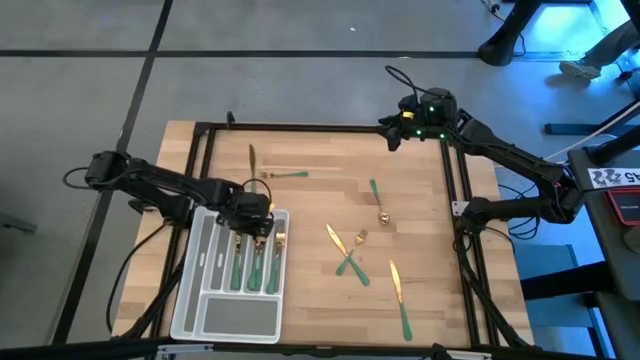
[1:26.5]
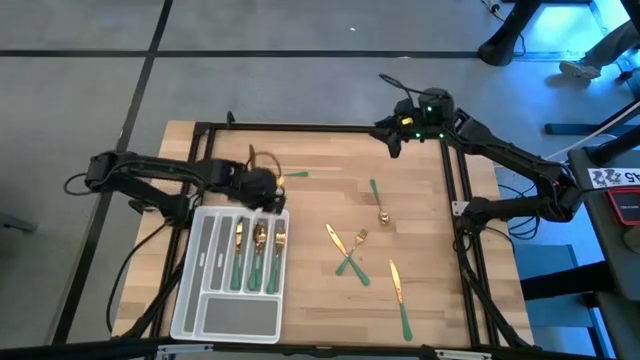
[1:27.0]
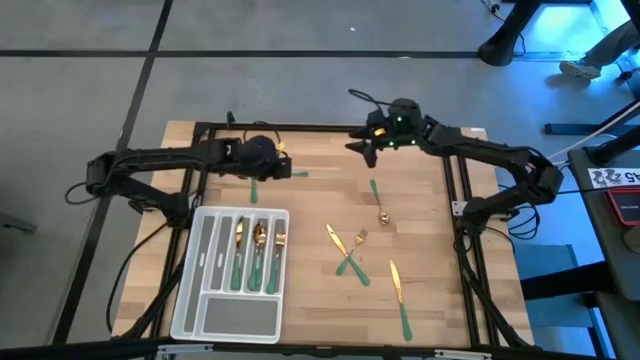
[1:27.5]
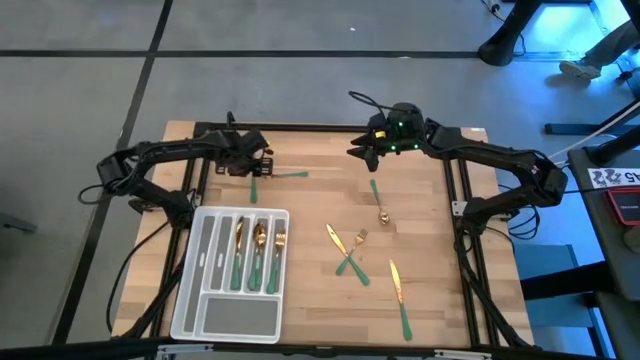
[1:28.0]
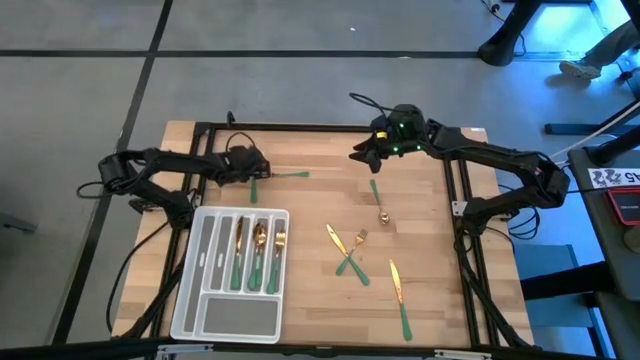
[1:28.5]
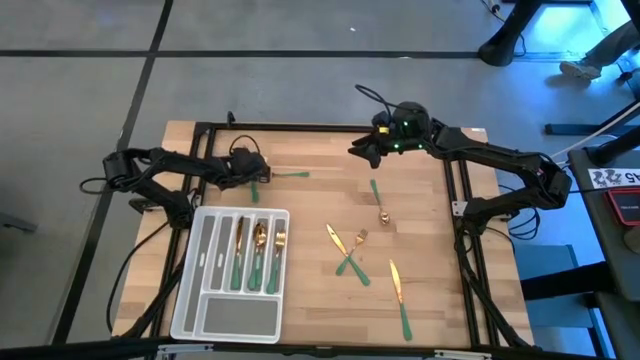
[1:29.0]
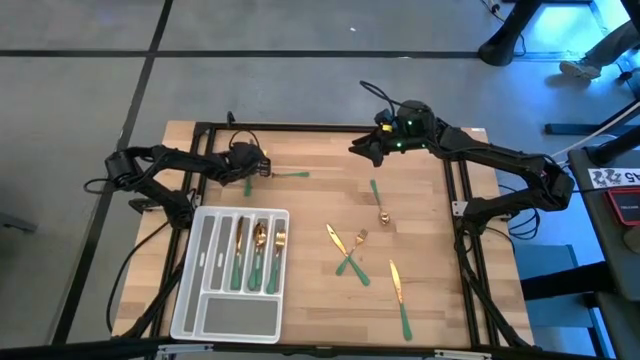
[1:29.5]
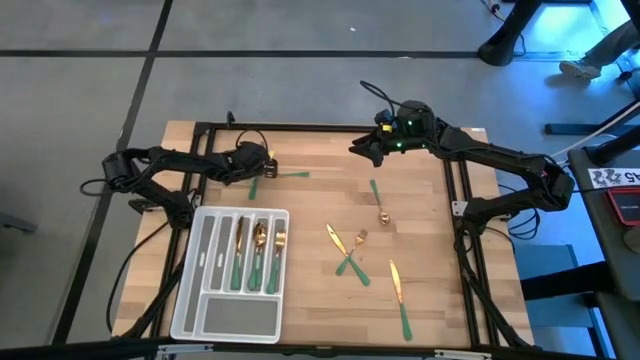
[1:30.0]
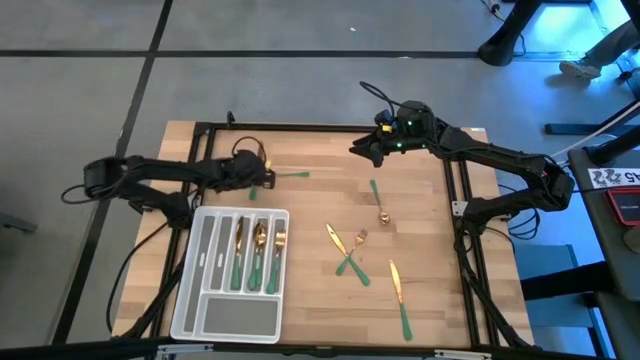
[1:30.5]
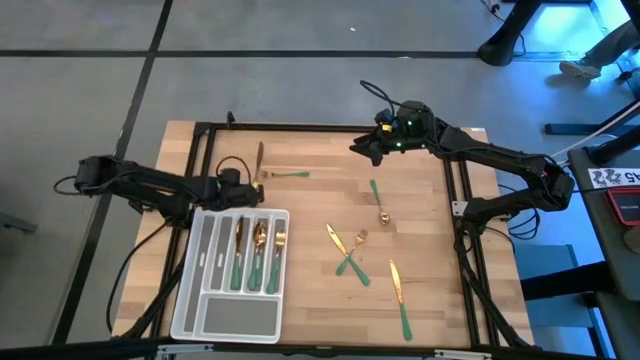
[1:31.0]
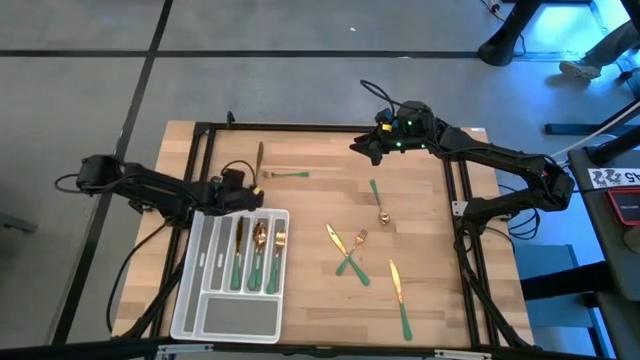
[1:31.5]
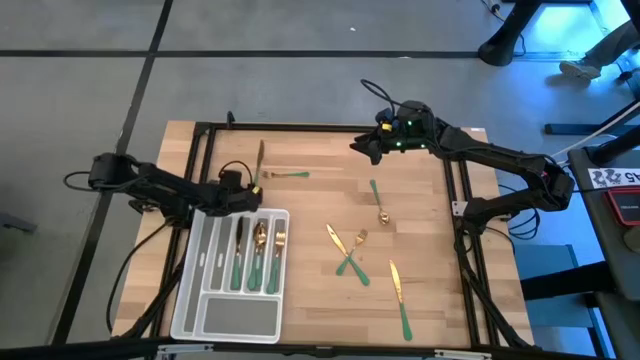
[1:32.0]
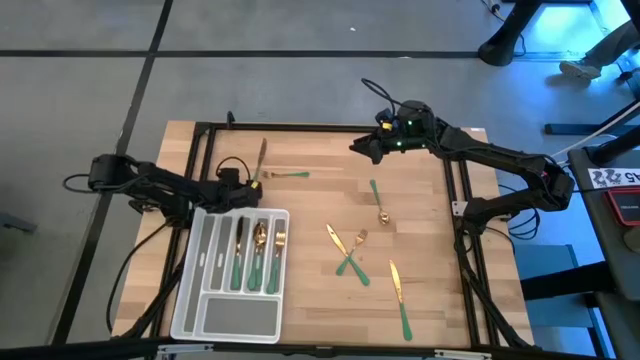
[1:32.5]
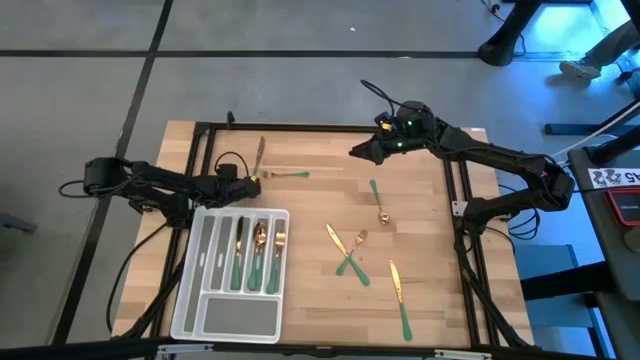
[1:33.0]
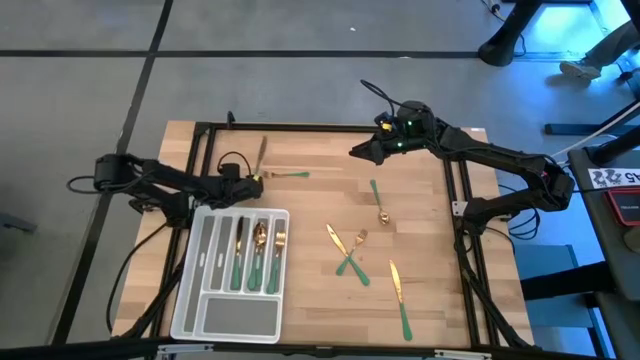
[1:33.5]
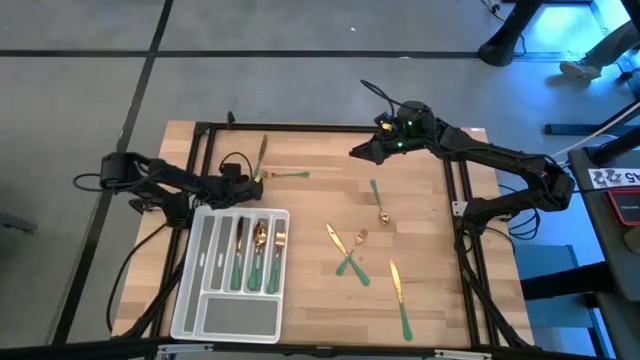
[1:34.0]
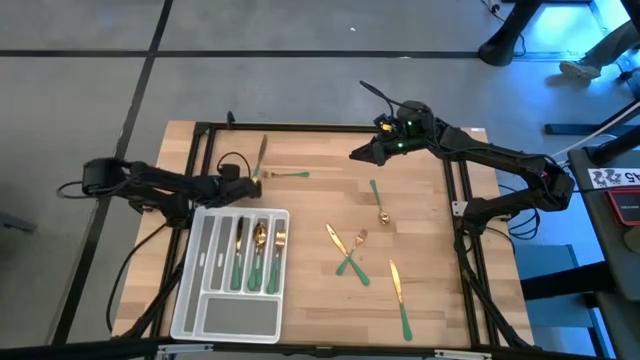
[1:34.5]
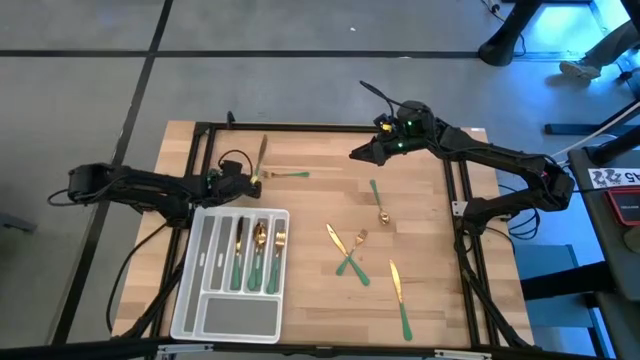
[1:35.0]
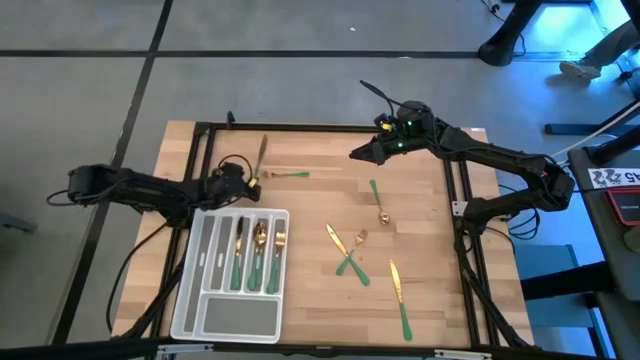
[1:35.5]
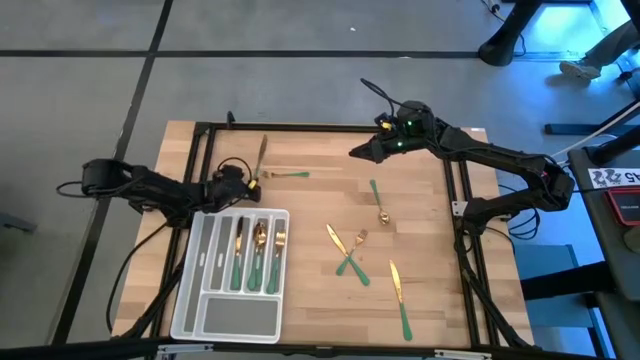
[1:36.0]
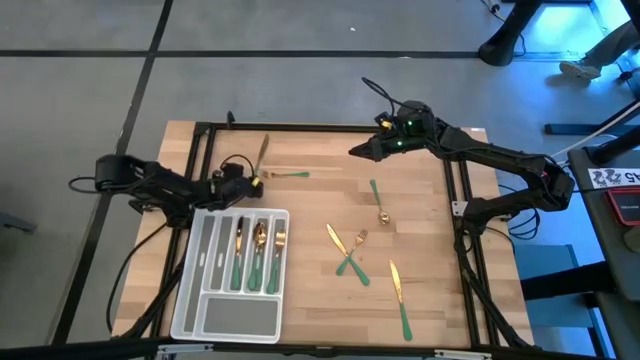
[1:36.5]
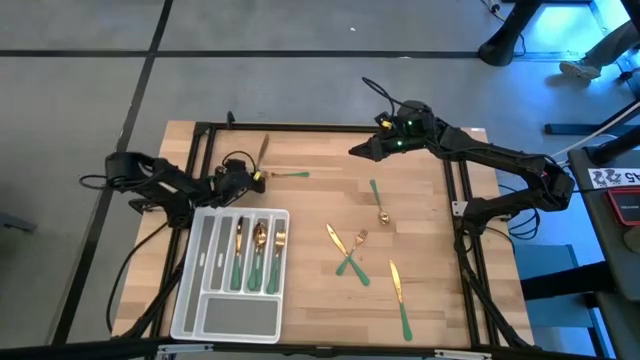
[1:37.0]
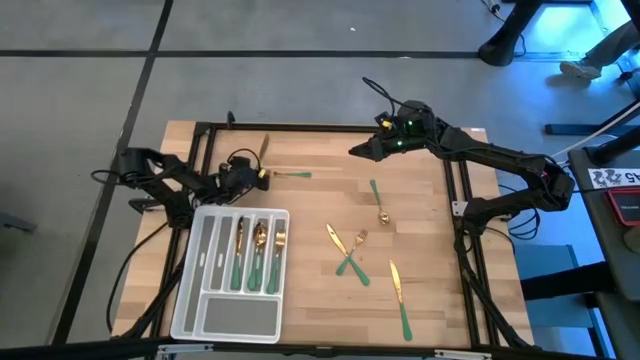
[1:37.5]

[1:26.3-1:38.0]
Task: Sort silverware
Put the knife into the silverware tray

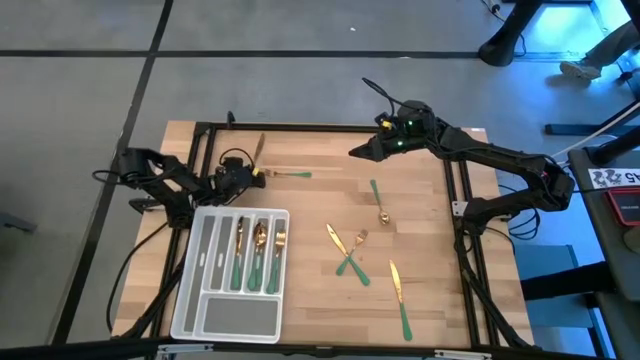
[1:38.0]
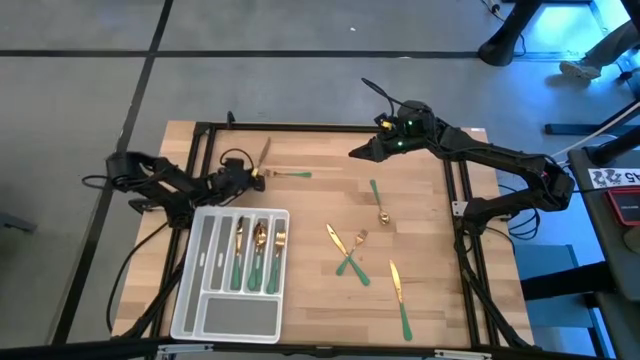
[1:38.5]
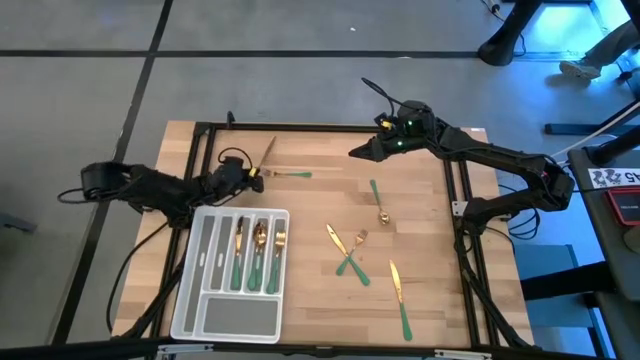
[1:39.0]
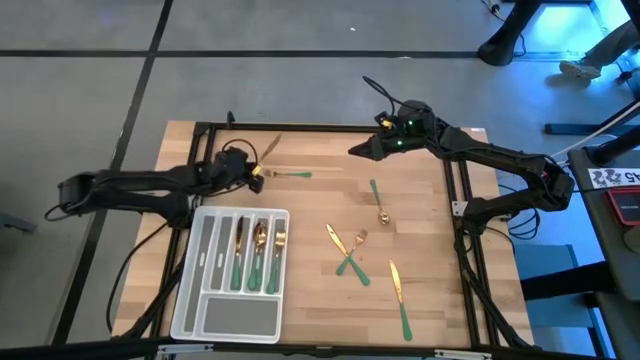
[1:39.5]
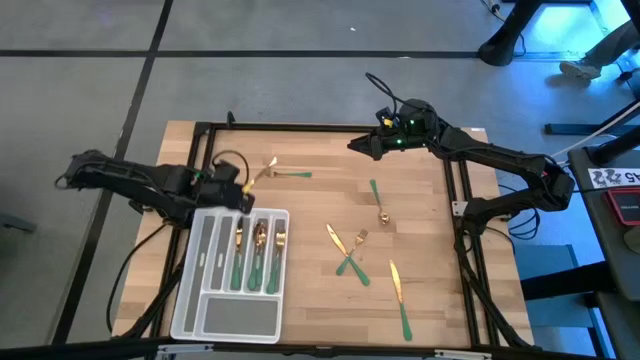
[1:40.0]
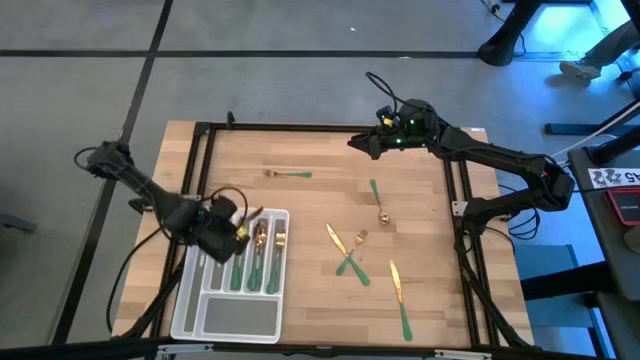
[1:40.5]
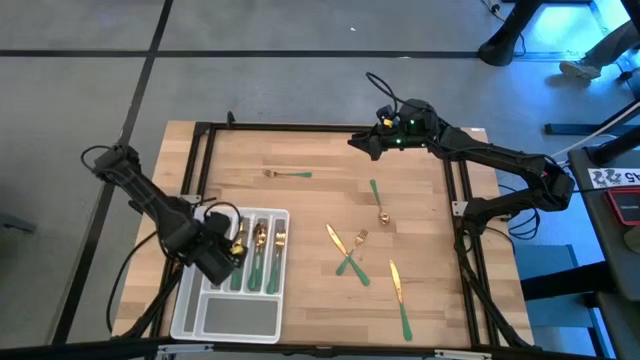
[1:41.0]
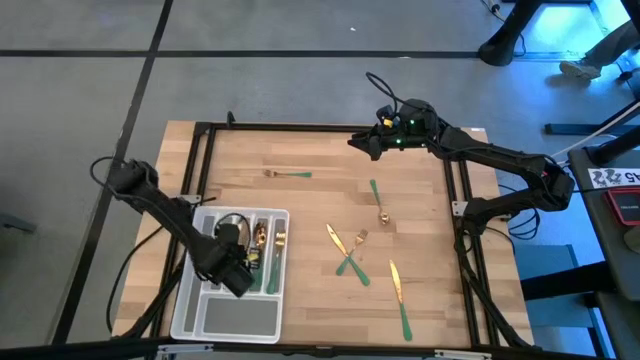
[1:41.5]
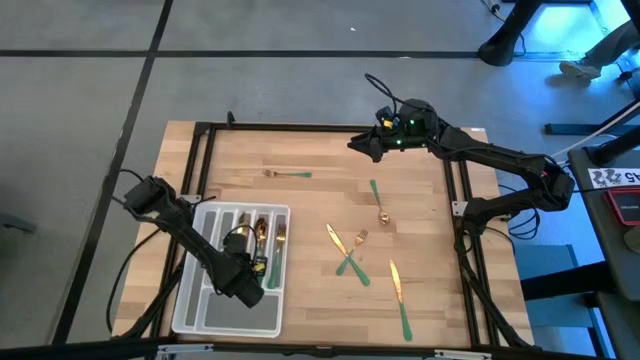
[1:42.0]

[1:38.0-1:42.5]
Put the knife into the silverware tray

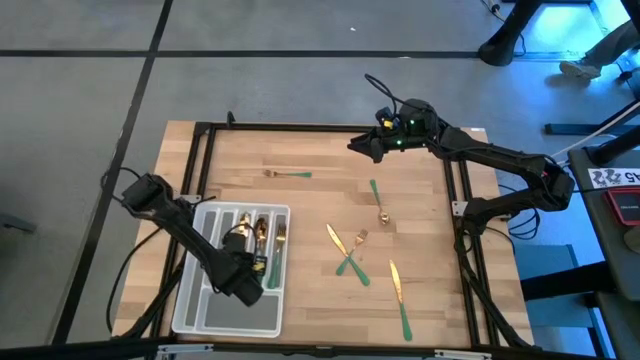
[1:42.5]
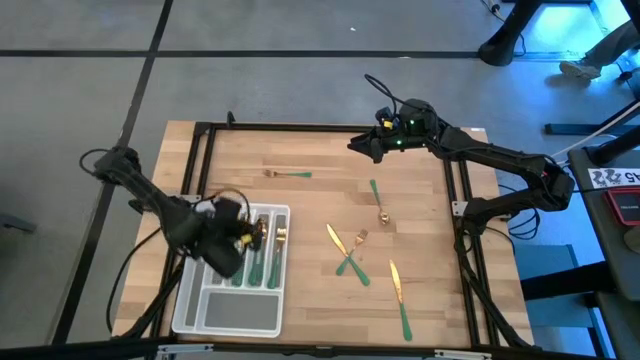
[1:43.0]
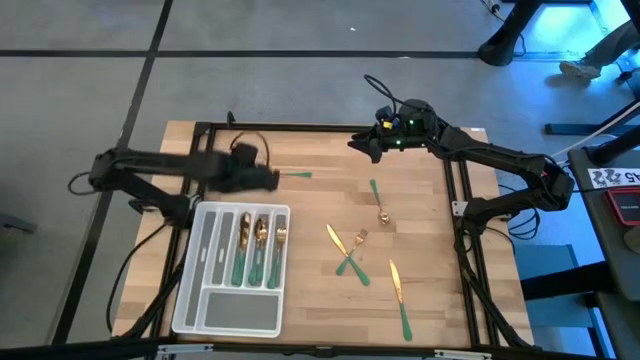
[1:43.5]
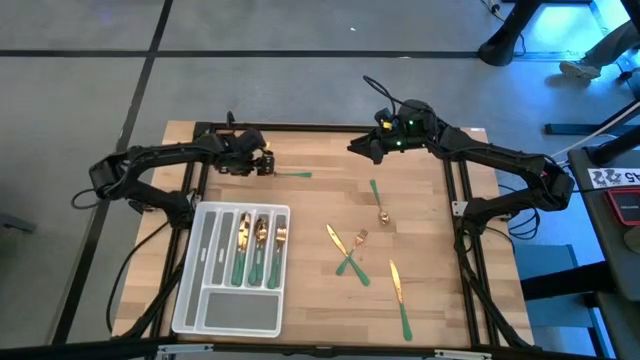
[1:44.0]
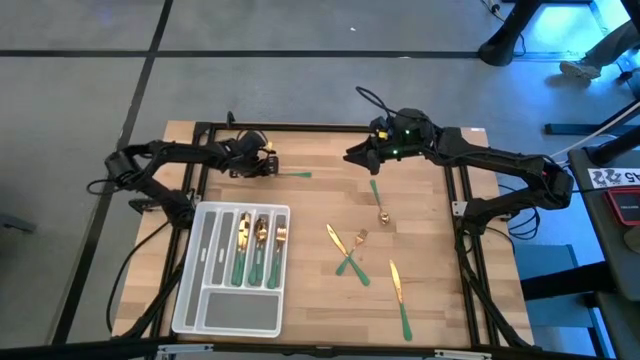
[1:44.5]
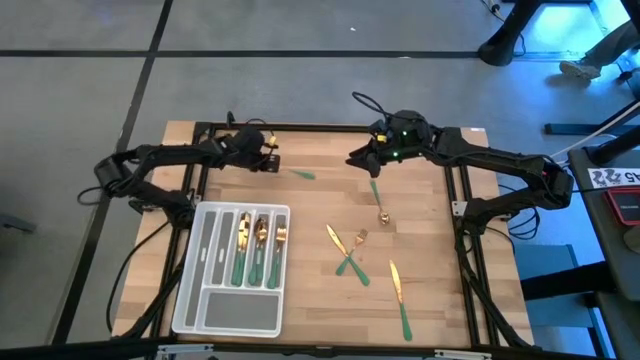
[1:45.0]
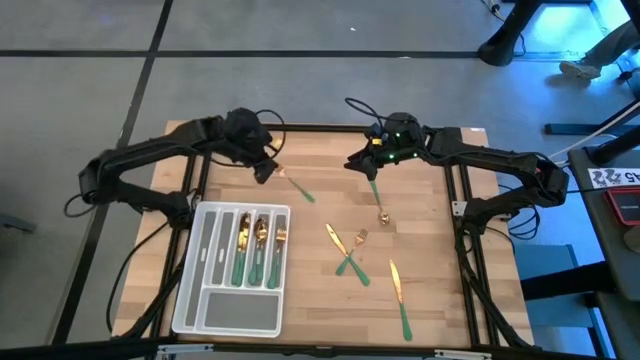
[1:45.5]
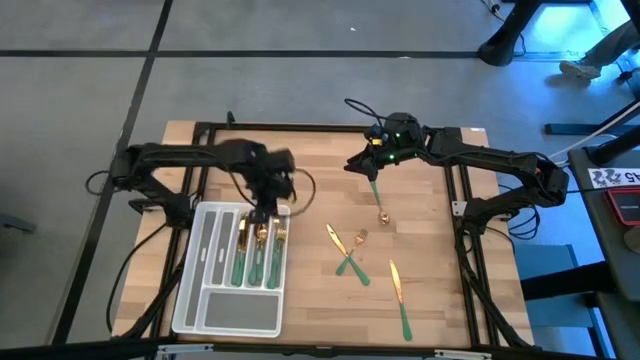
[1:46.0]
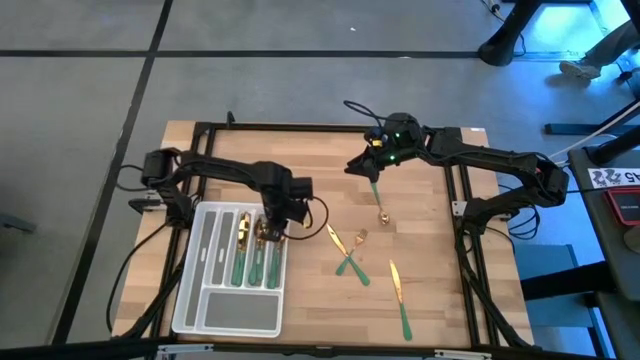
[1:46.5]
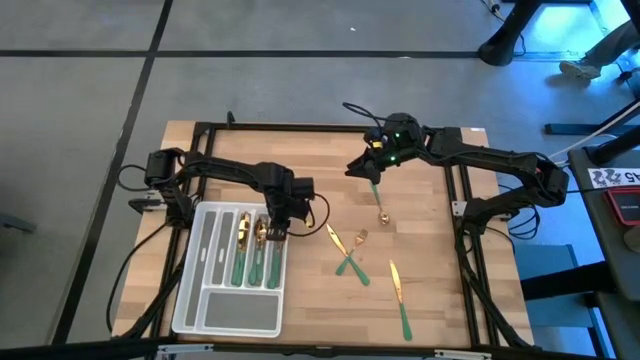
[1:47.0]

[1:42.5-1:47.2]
Put the fork into the silverware tray
